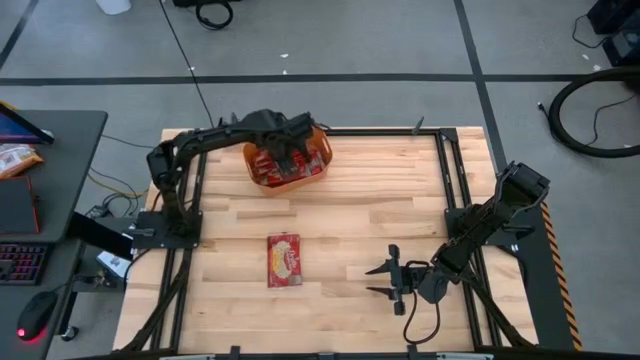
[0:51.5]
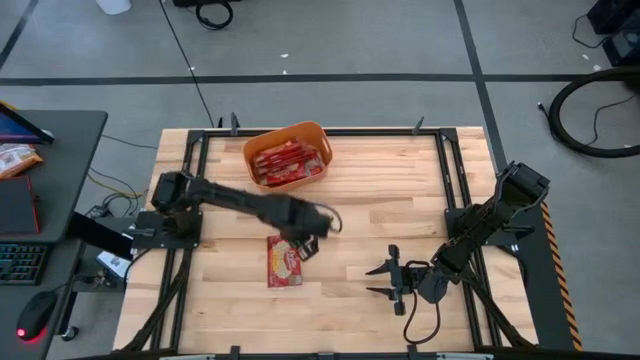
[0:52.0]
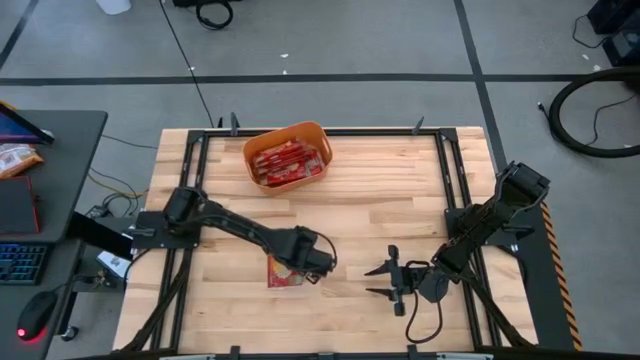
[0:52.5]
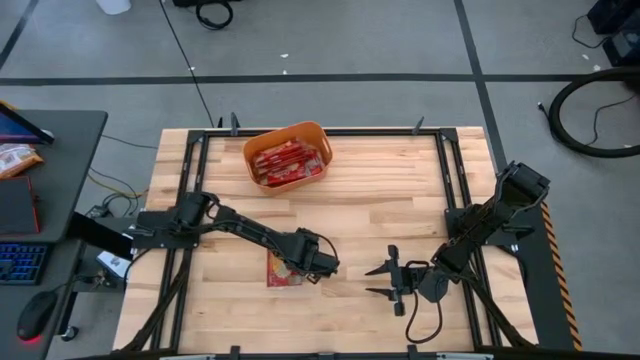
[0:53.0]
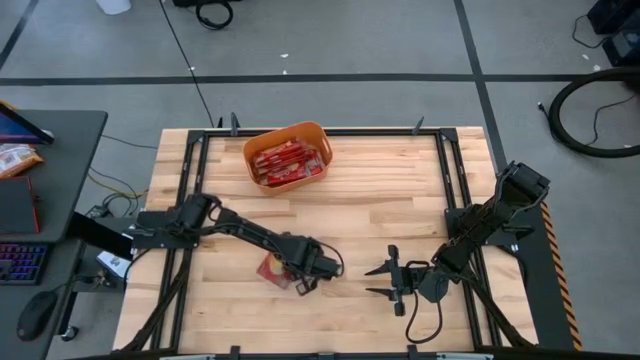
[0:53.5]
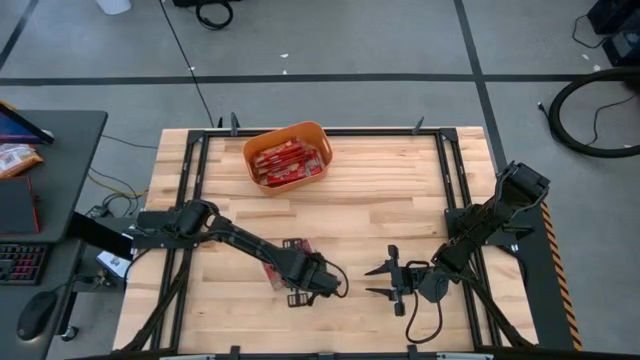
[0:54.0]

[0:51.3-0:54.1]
Task: Sort popcorn bags into baskets
Put the red popcorn bag into the orange bin

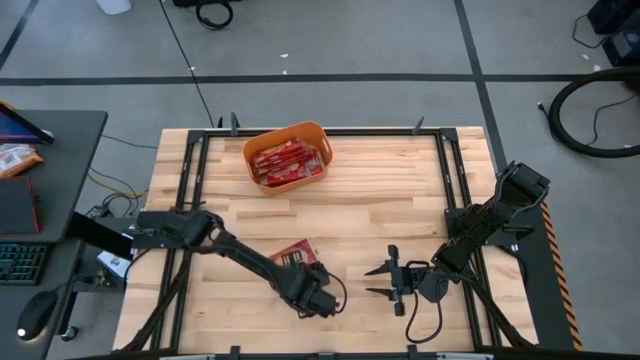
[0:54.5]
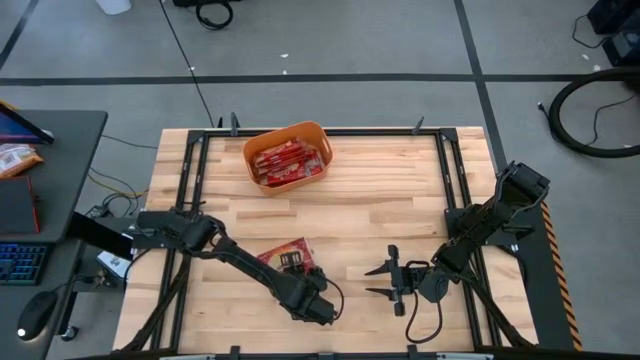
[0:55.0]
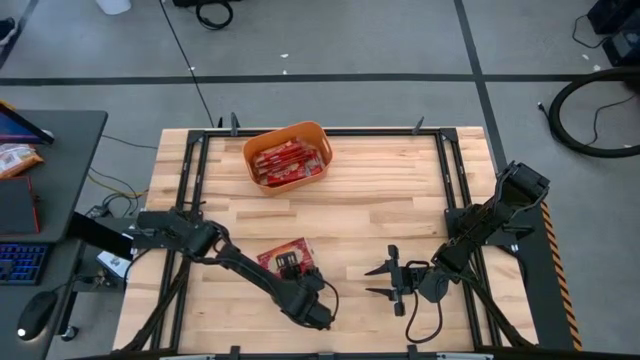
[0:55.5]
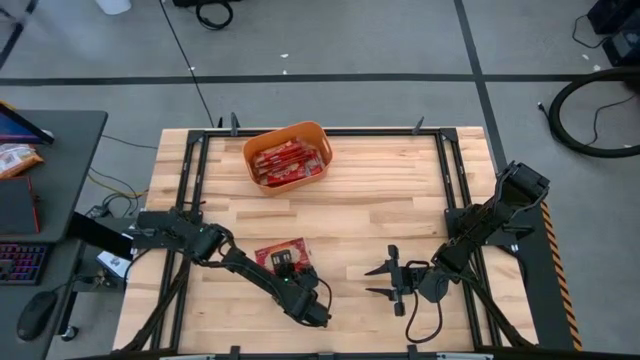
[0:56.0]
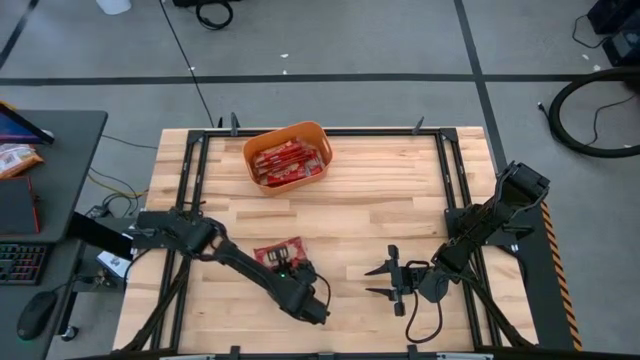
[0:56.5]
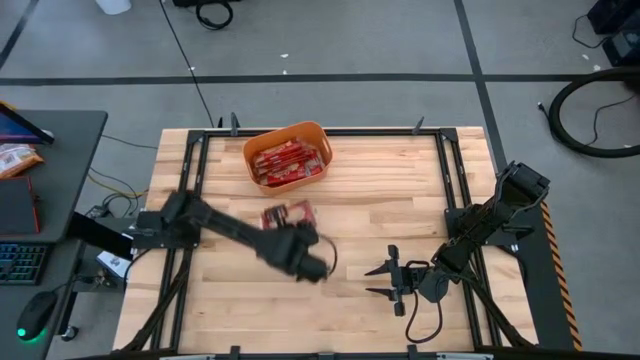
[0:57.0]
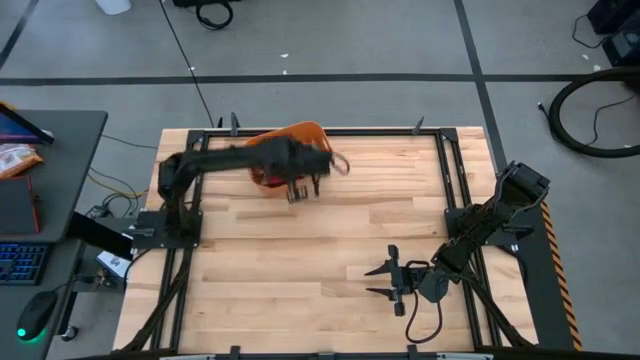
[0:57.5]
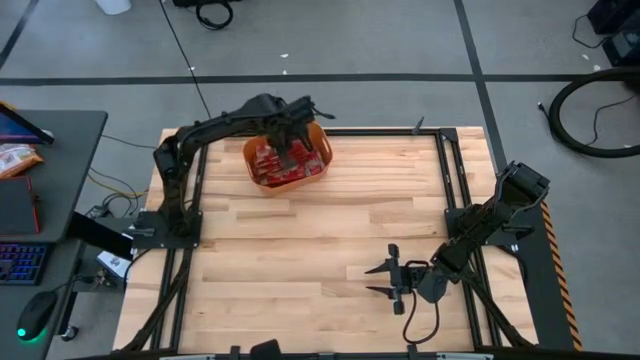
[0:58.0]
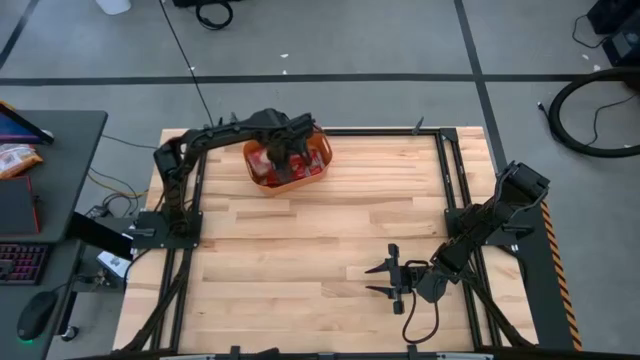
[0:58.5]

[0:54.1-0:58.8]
Put the red popcorn bag into the orange bin

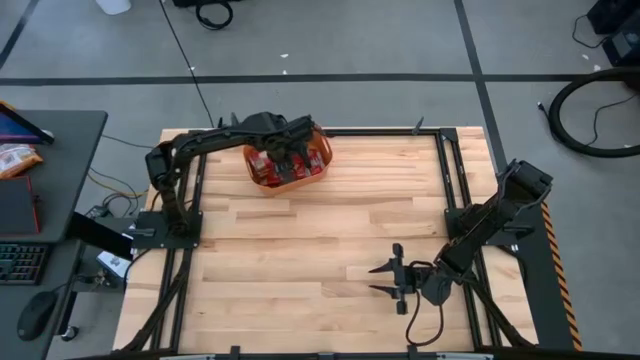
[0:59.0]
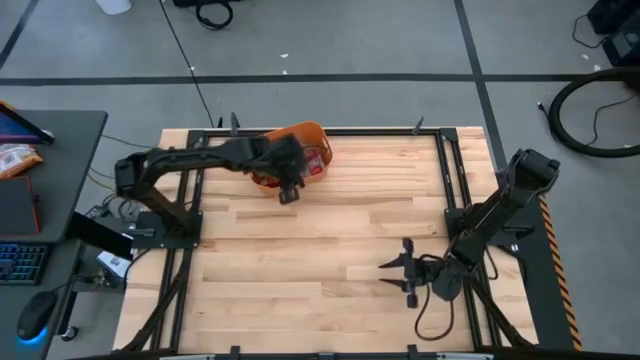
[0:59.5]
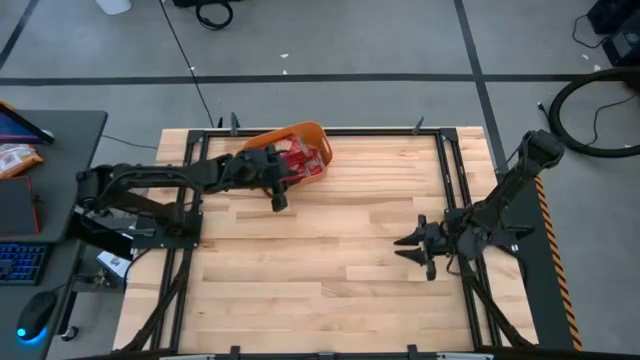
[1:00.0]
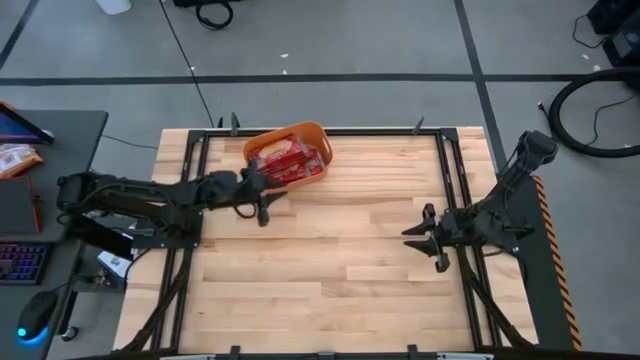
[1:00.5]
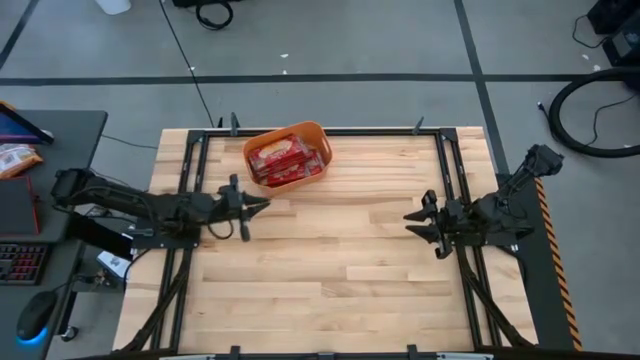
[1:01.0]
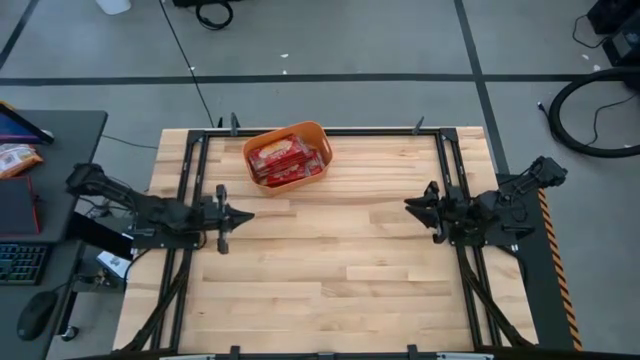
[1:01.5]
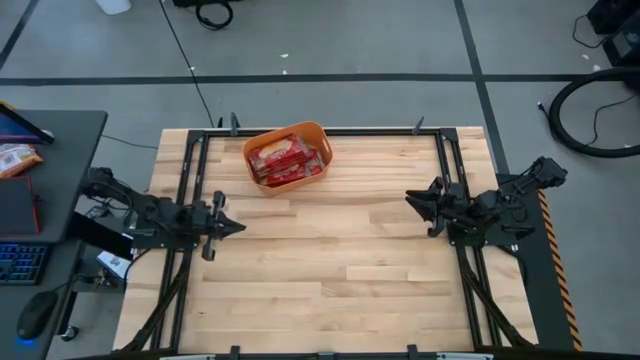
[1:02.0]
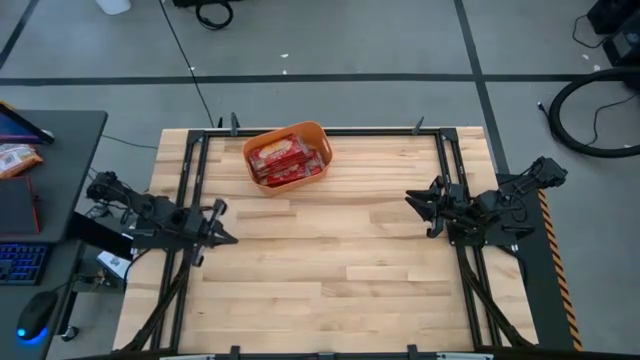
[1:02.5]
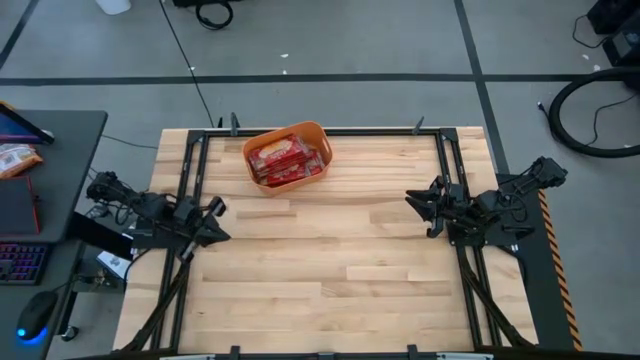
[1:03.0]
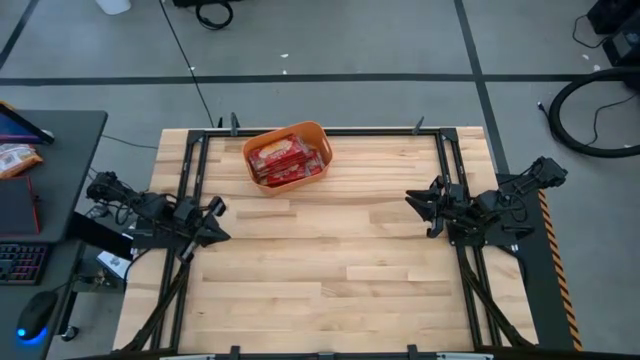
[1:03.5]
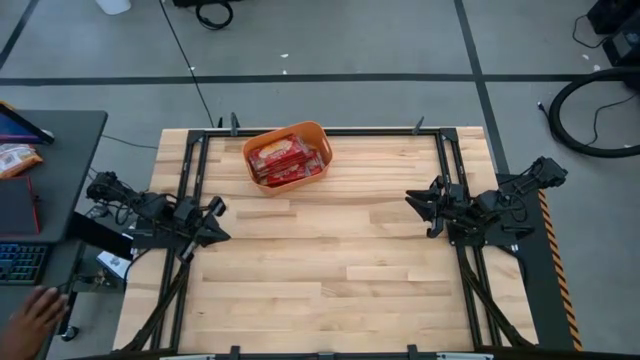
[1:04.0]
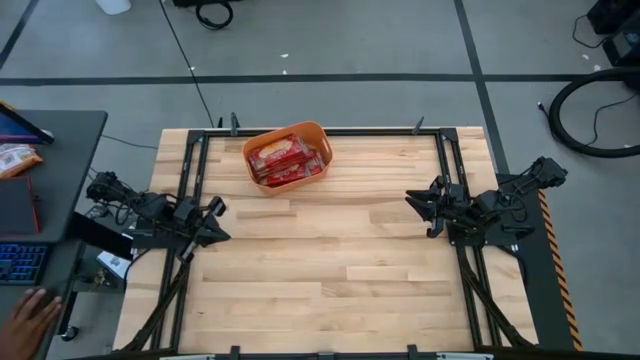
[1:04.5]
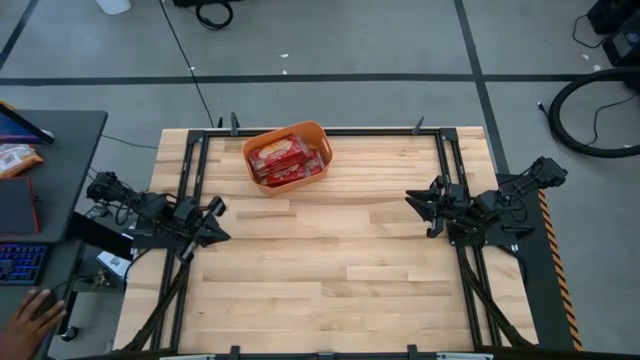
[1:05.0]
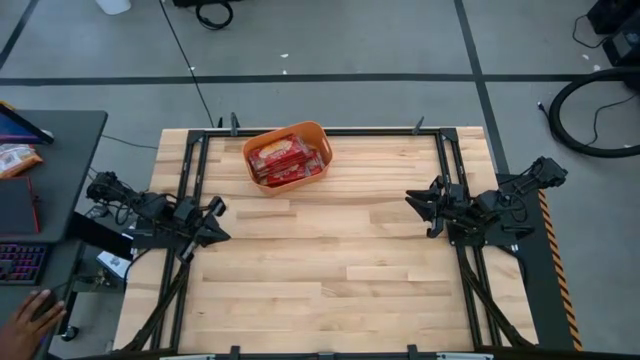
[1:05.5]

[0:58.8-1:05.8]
Return to Home Position

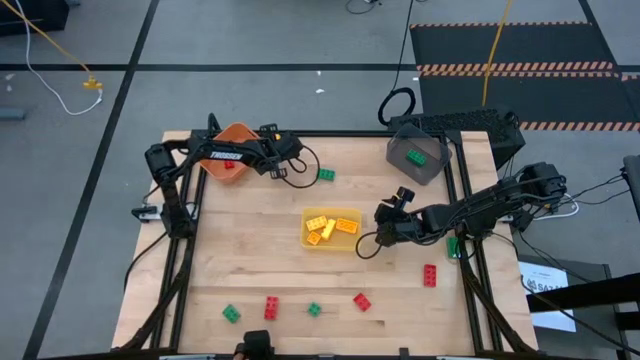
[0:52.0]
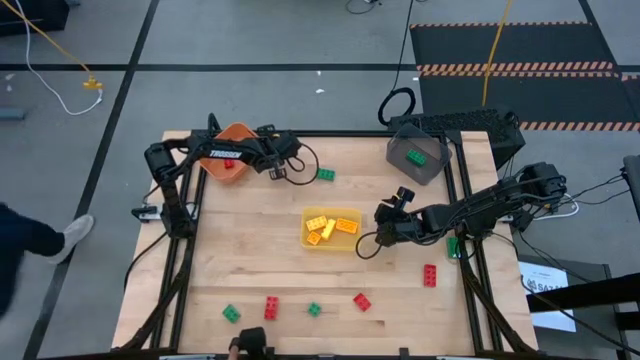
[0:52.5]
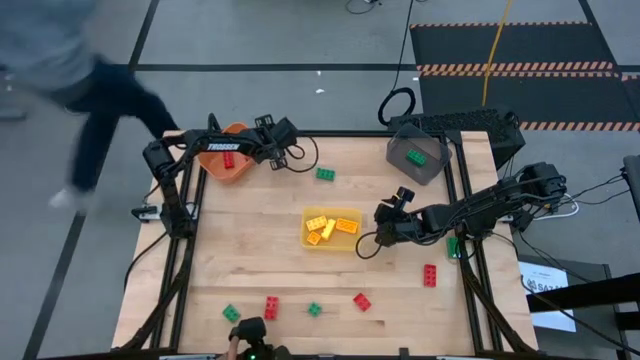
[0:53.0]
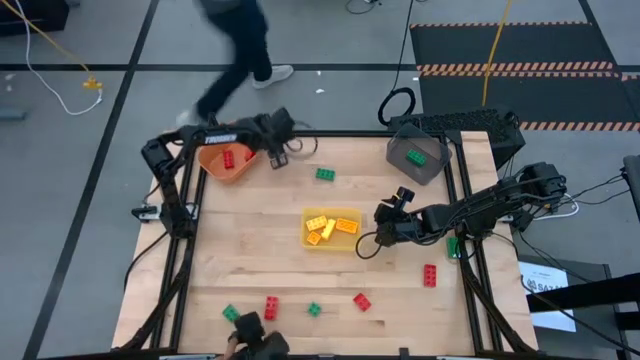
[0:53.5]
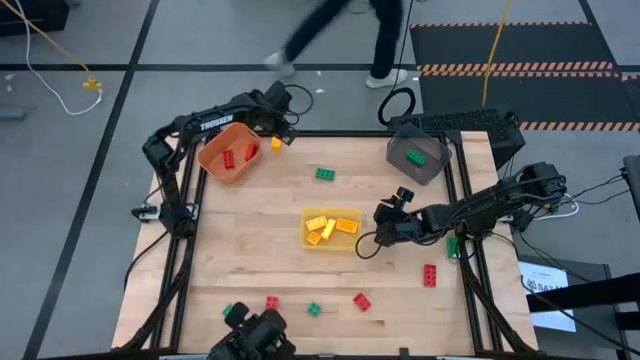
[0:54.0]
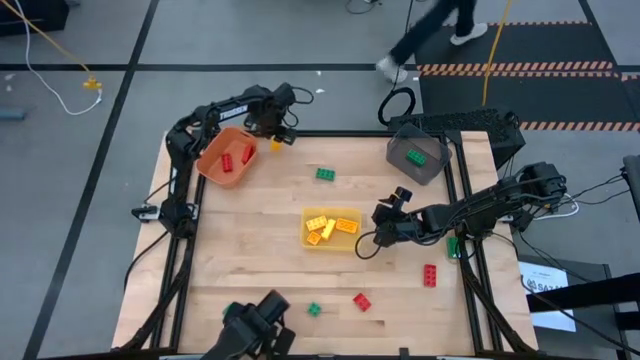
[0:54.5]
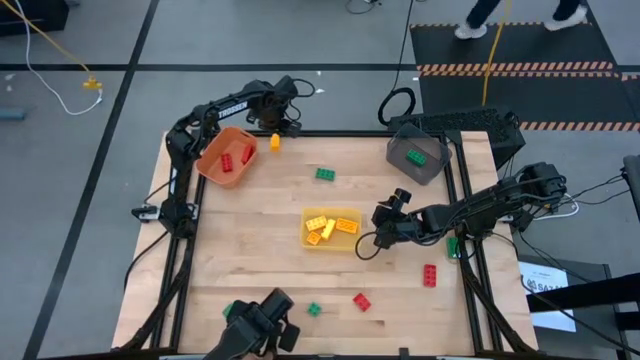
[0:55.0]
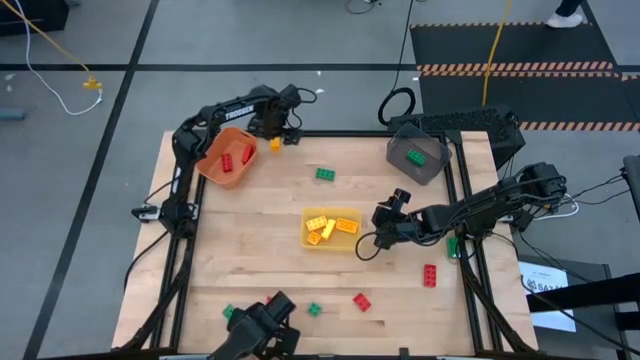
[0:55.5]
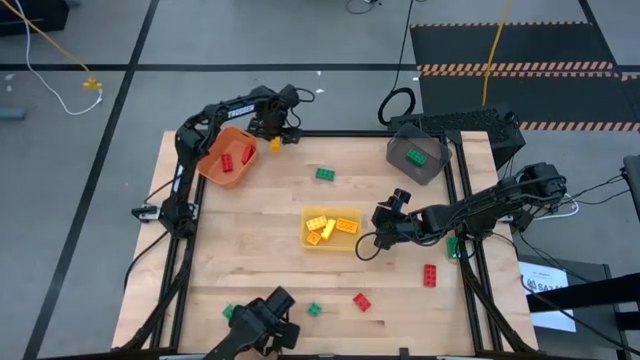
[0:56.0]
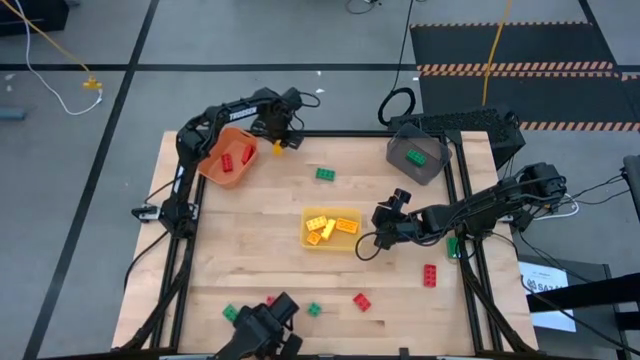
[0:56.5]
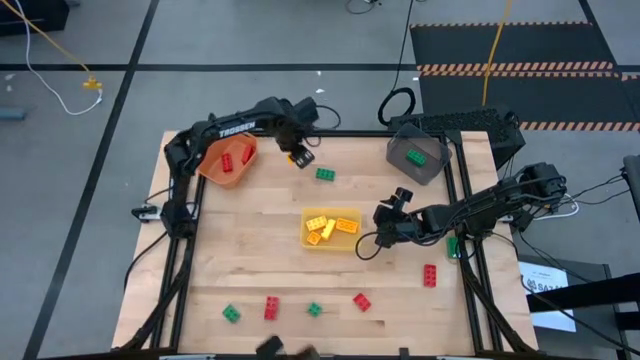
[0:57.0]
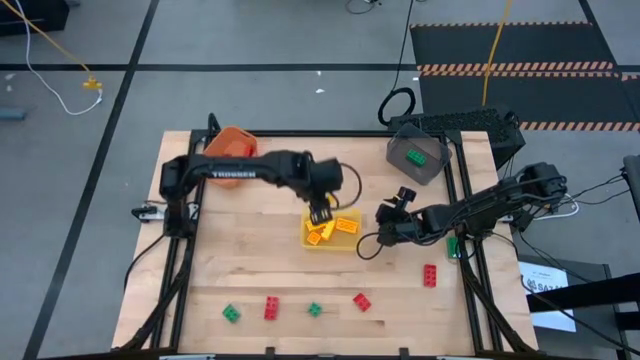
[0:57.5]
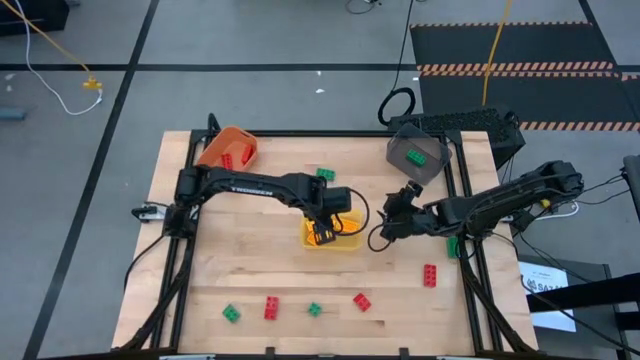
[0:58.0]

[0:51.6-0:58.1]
Task: Sort & place blocks by color
Put the yellow 1-stud game piece into the yellow bin
